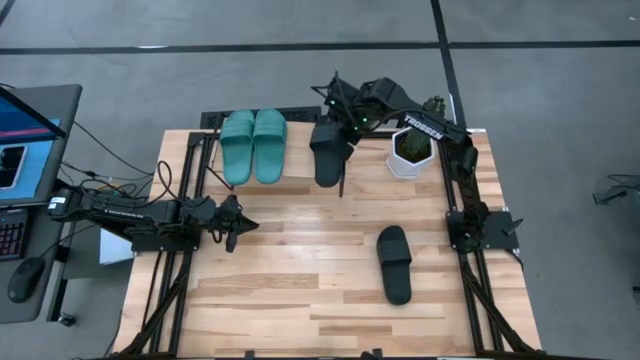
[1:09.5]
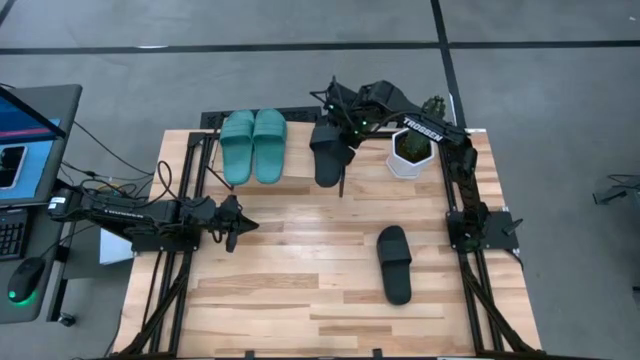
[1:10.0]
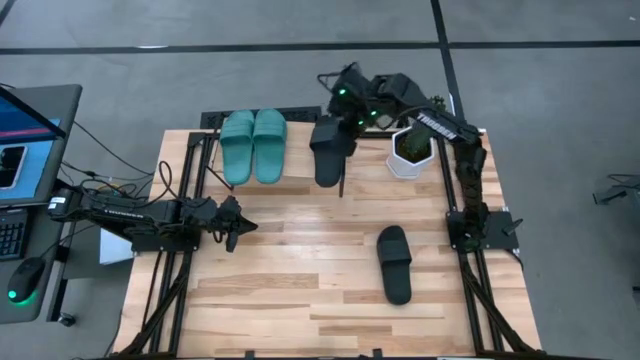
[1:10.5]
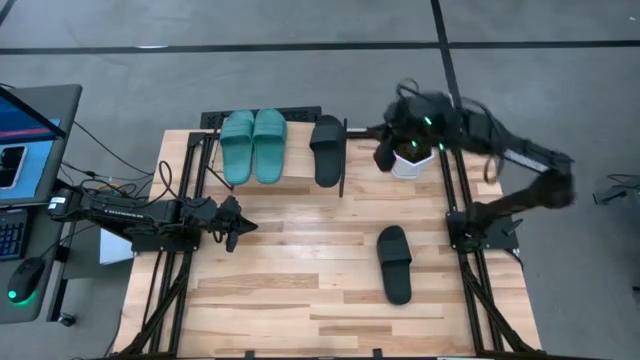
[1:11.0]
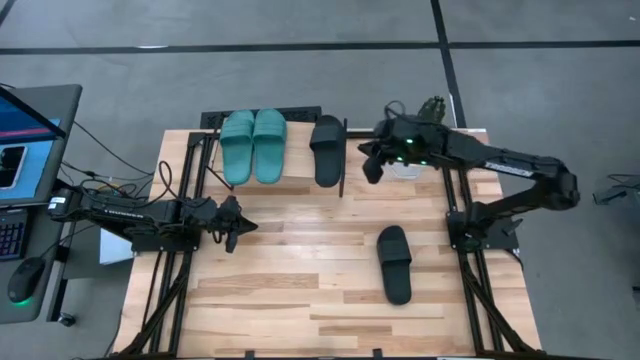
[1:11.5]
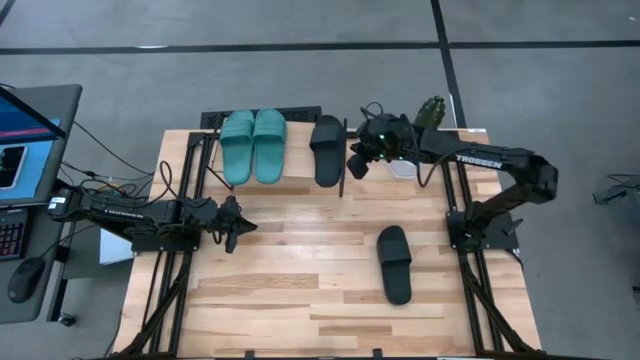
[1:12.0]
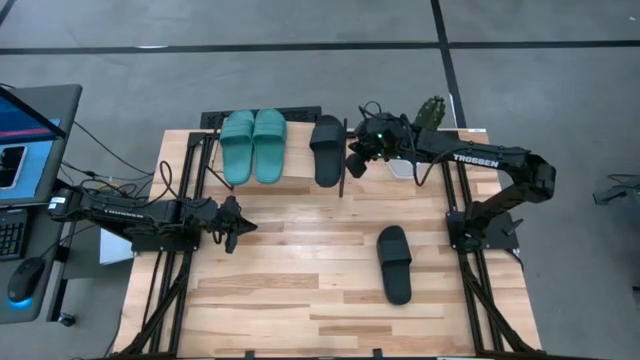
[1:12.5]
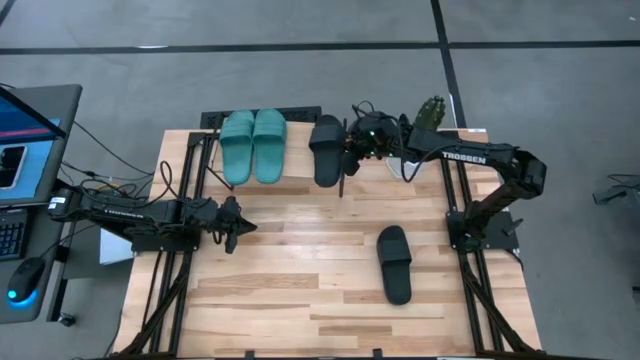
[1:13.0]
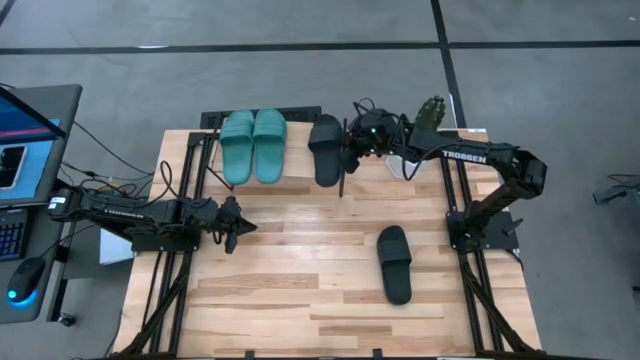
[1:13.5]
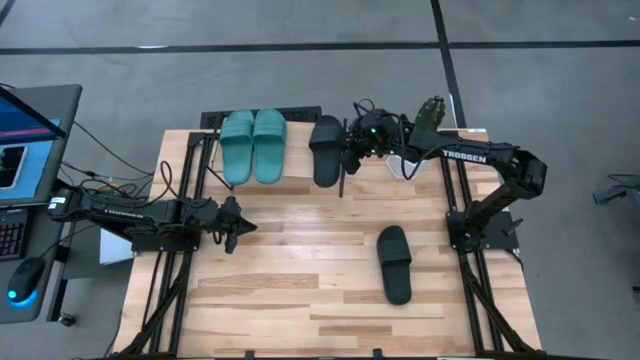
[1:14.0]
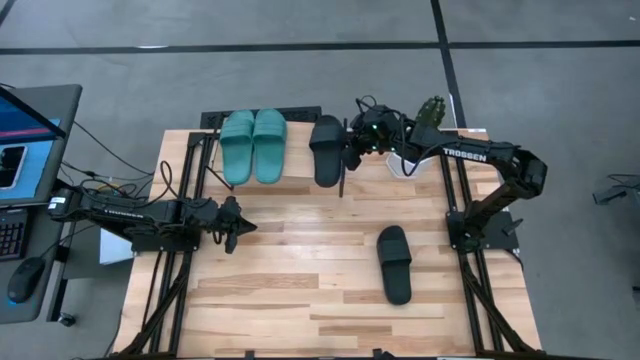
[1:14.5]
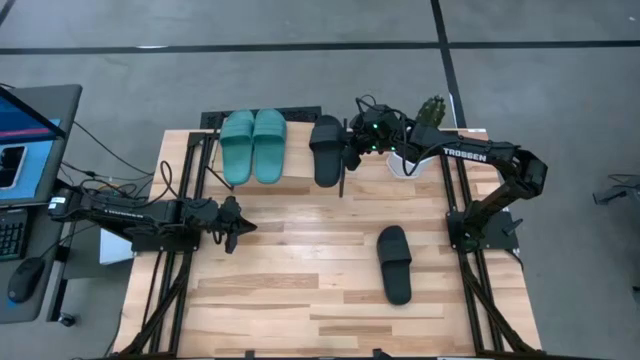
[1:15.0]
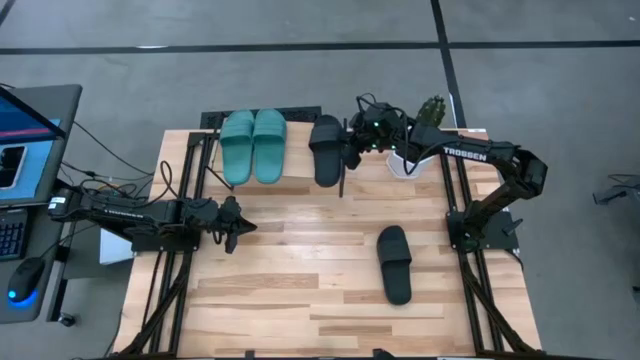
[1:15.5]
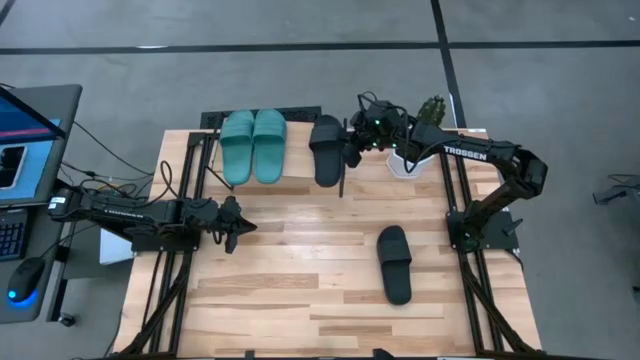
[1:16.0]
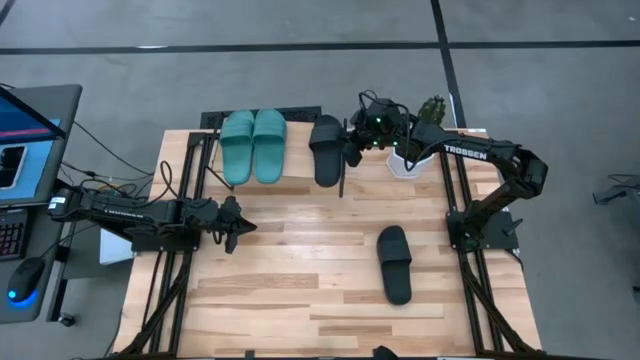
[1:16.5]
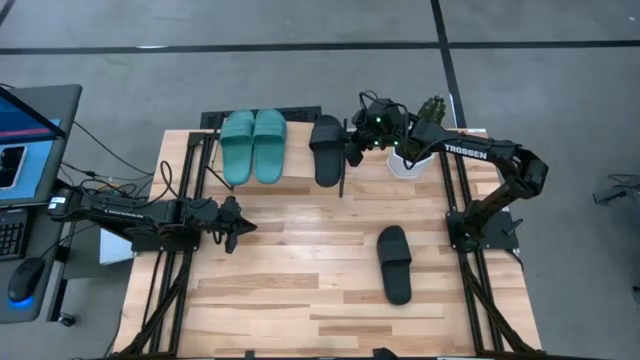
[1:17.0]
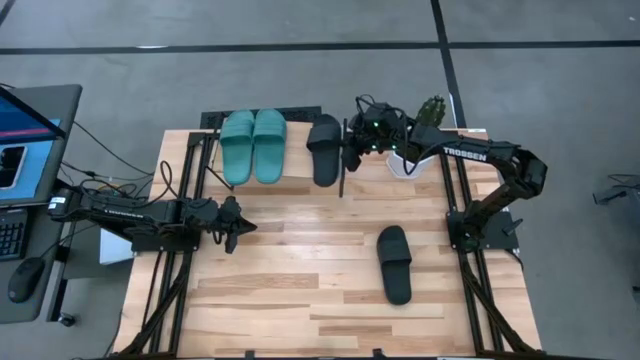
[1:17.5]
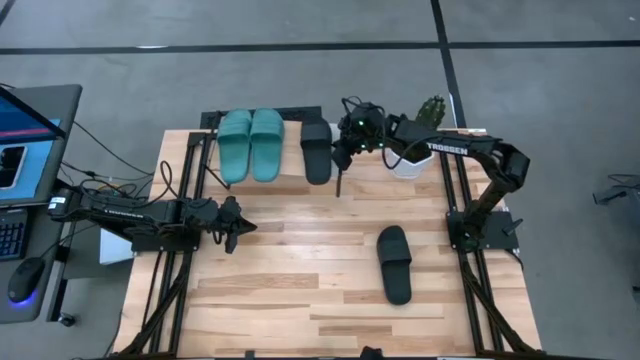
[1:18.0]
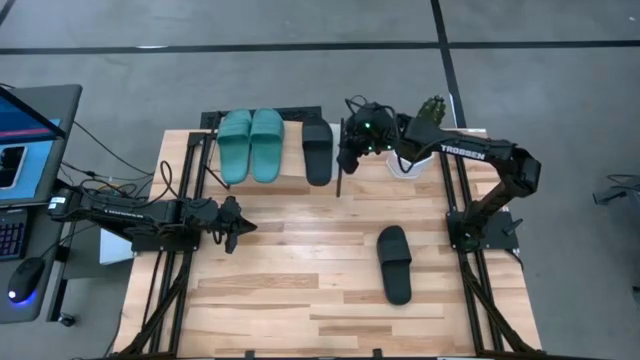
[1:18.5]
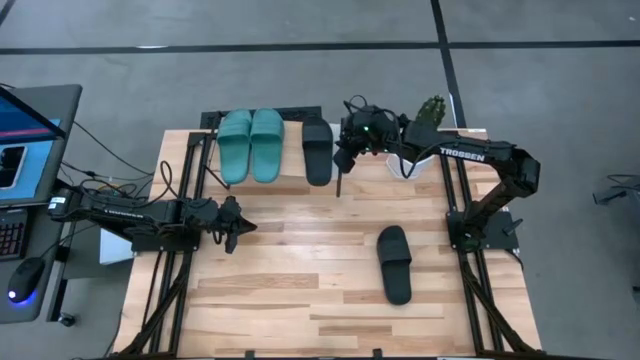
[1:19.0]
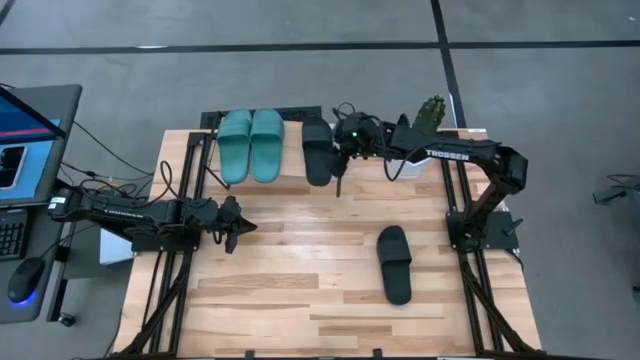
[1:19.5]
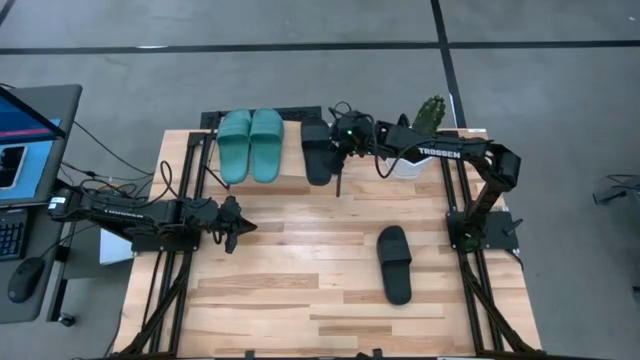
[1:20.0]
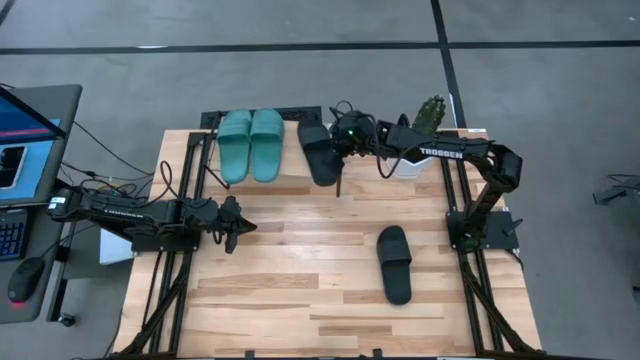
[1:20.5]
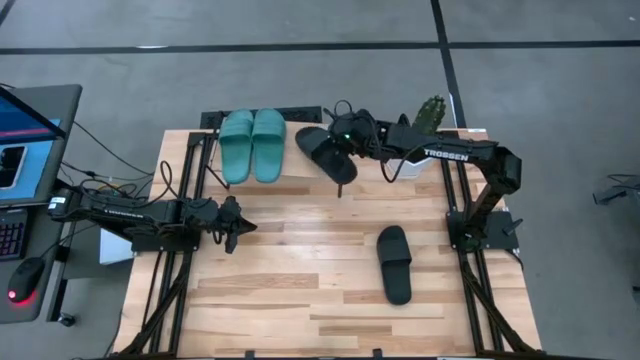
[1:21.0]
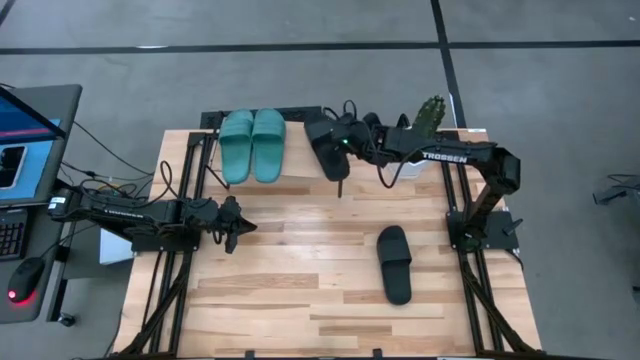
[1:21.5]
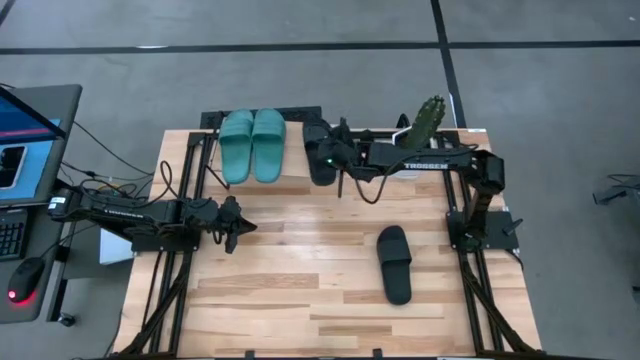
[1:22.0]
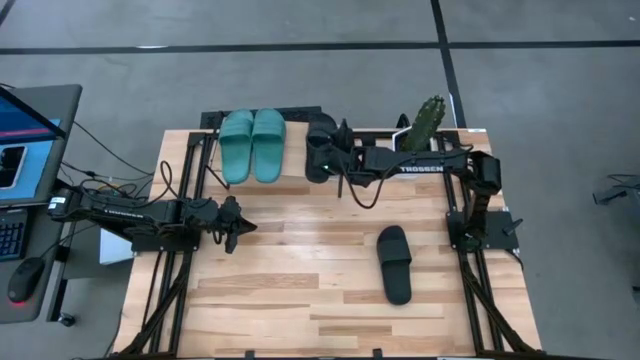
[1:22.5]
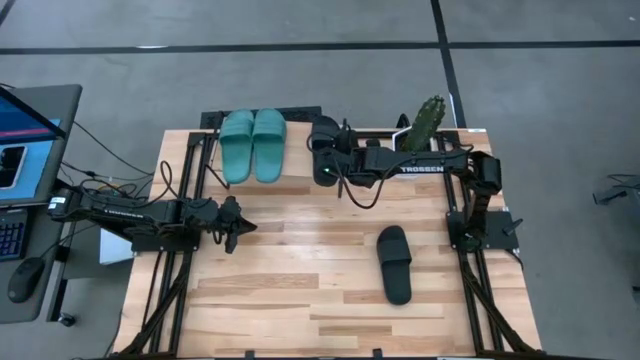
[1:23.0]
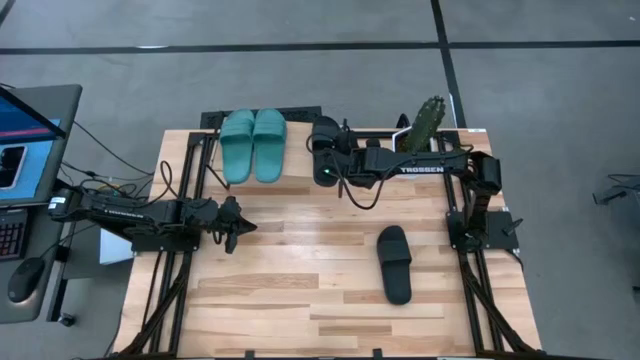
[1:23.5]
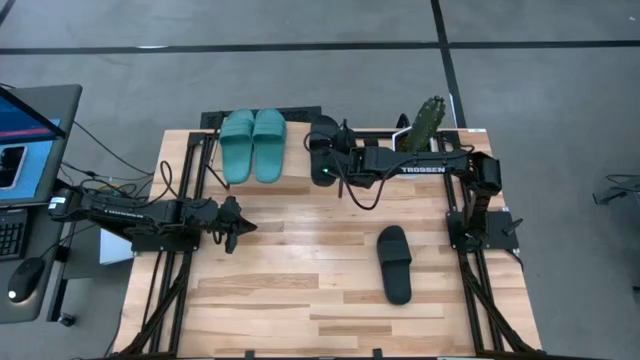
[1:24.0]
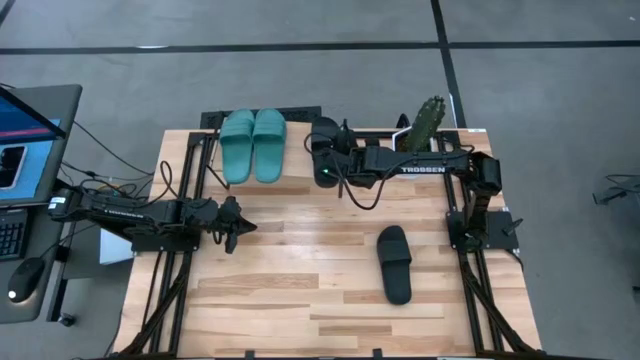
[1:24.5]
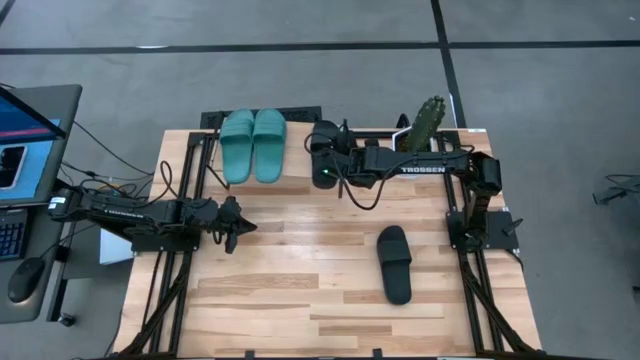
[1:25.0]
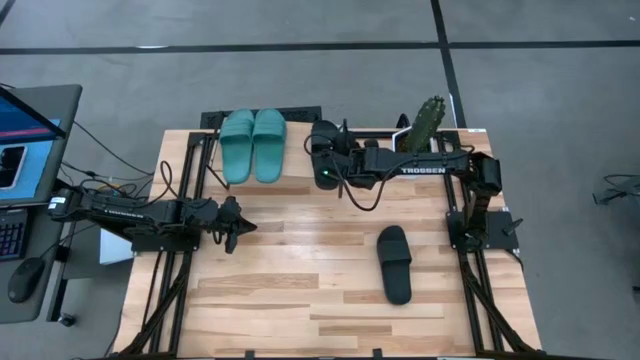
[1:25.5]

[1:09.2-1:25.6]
Task: Pick and place slides into the shelf
Put the left black slide on the shelf
